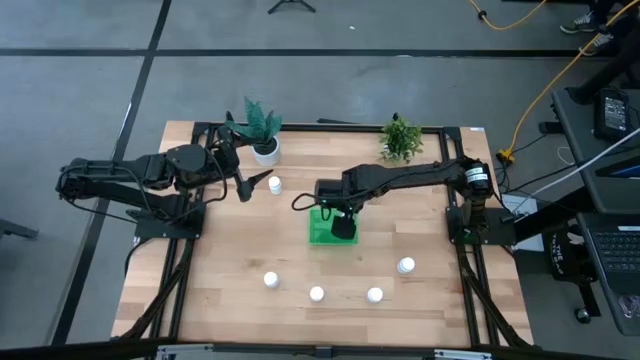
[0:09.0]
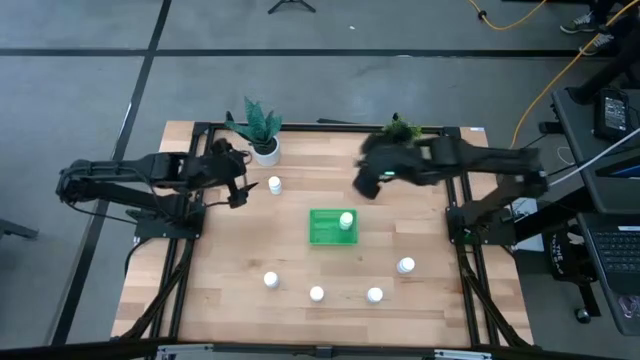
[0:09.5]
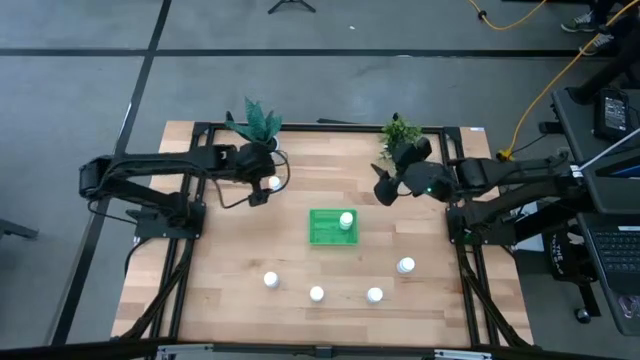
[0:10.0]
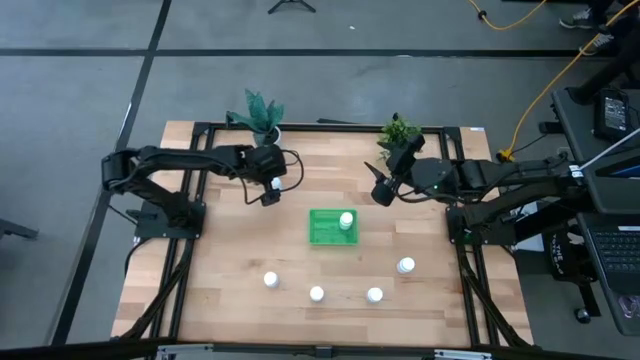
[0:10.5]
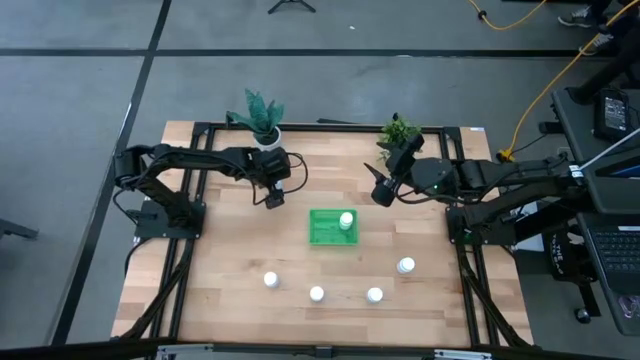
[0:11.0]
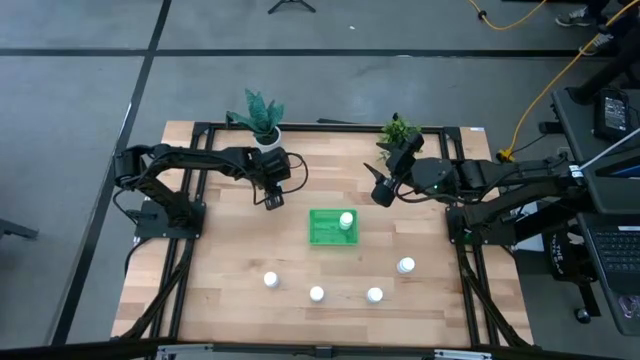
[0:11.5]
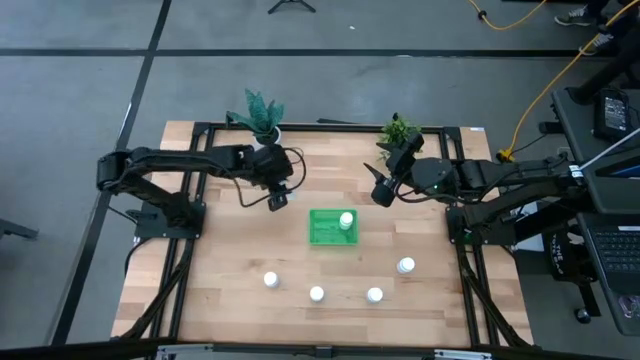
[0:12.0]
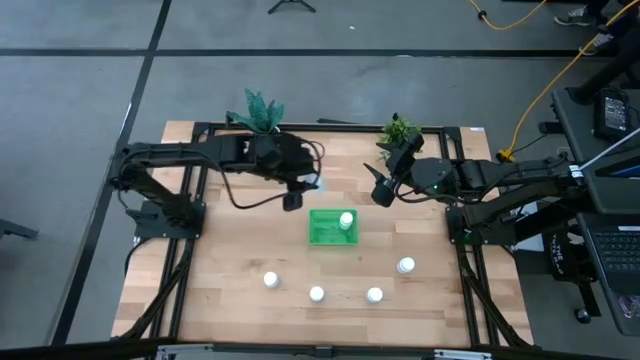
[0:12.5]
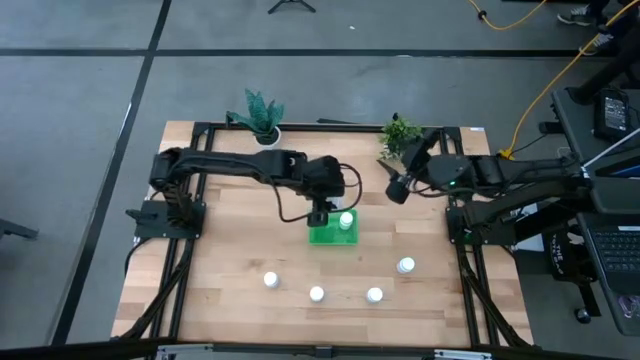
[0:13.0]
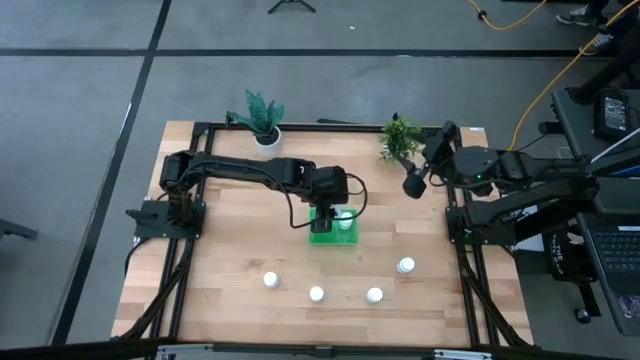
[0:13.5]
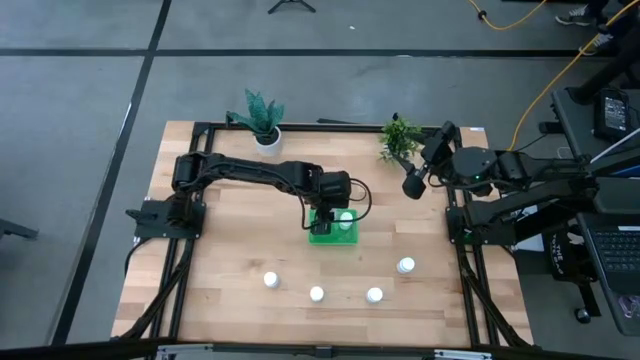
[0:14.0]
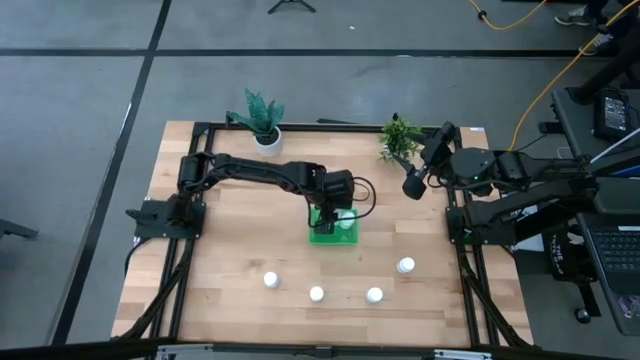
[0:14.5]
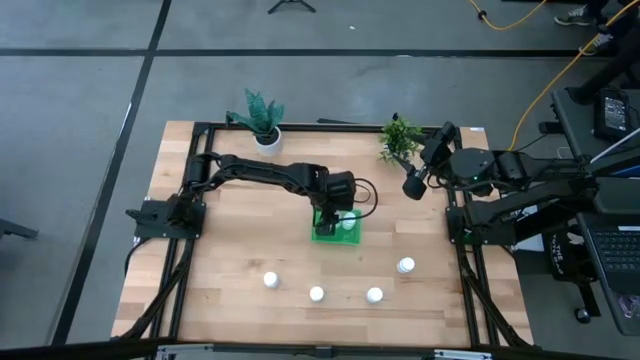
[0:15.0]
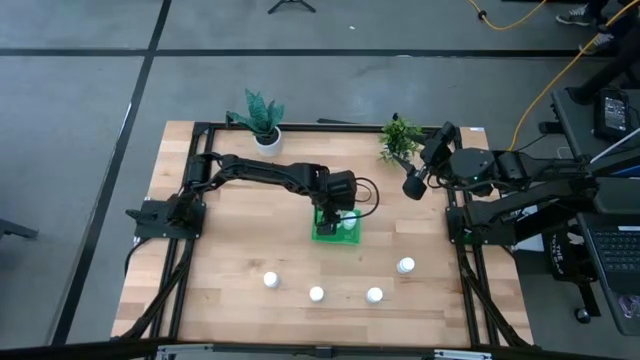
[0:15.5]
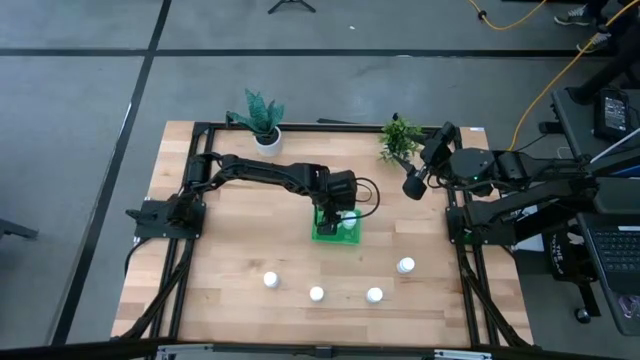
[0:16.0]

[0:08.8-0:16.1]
Task: Pick and place pill bottles into a basket
Put the white pill bottle into the green bin

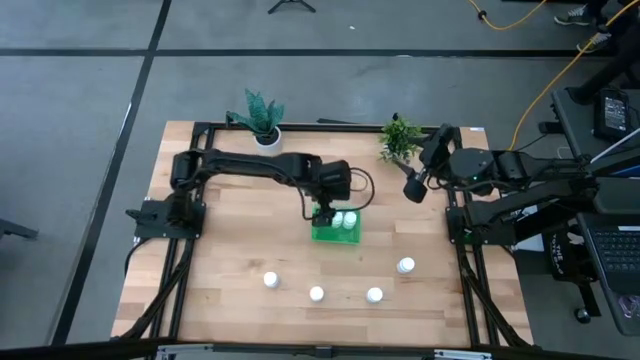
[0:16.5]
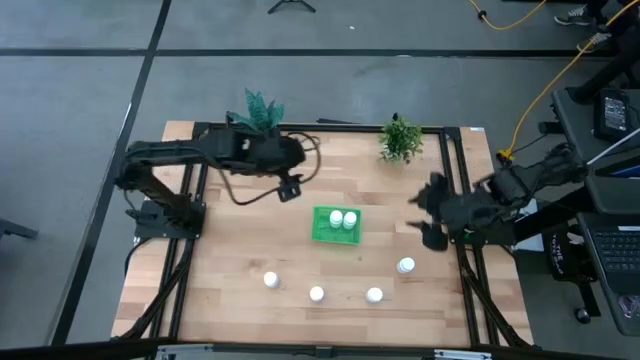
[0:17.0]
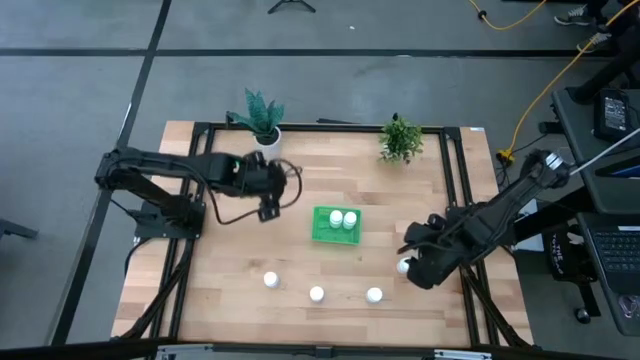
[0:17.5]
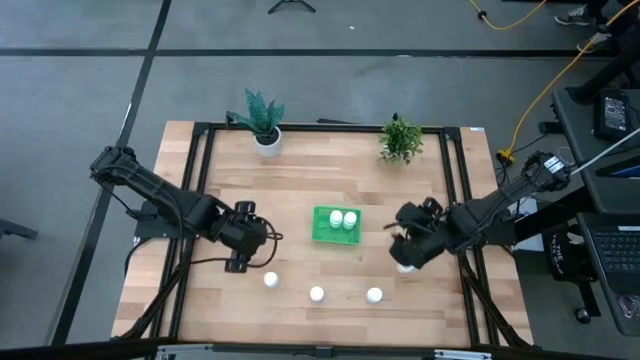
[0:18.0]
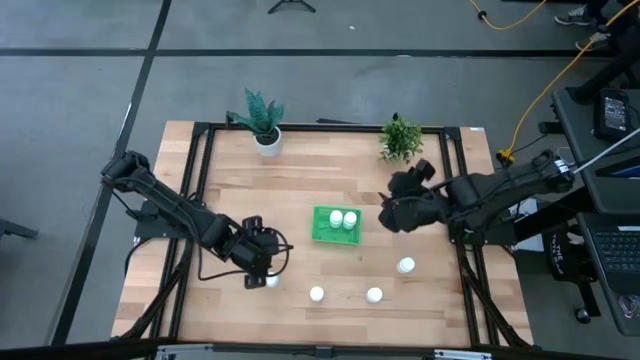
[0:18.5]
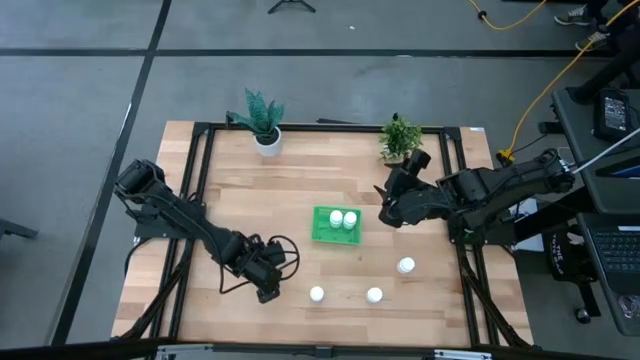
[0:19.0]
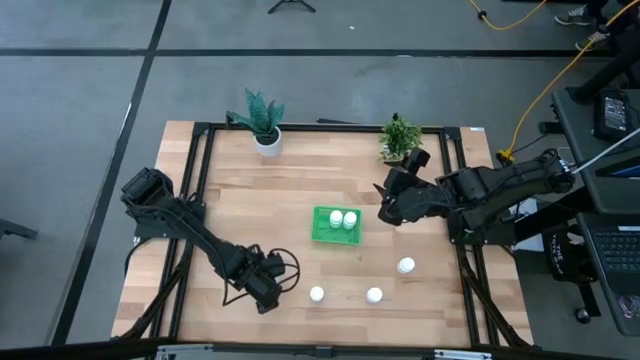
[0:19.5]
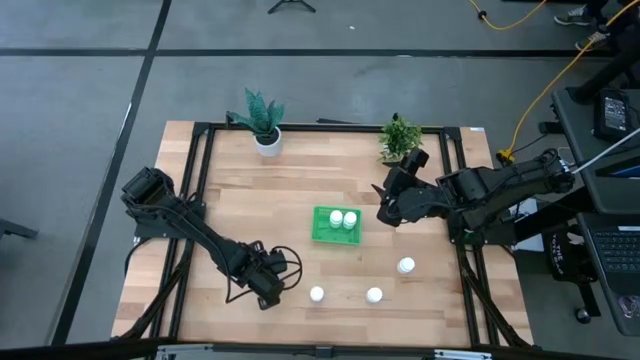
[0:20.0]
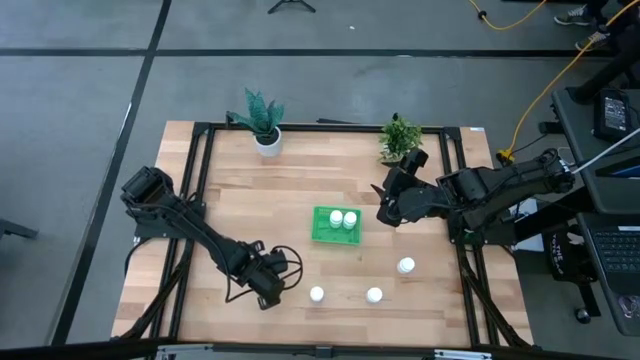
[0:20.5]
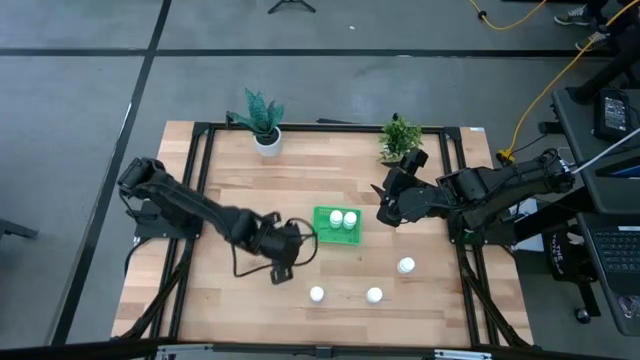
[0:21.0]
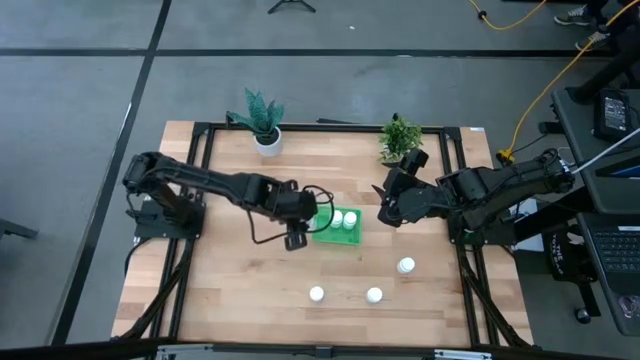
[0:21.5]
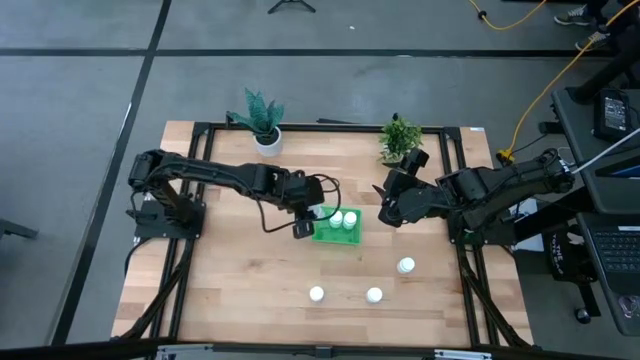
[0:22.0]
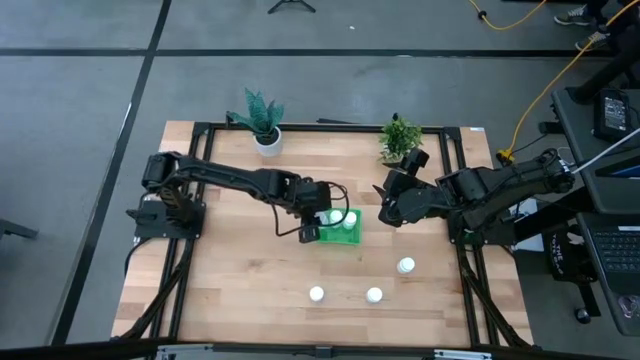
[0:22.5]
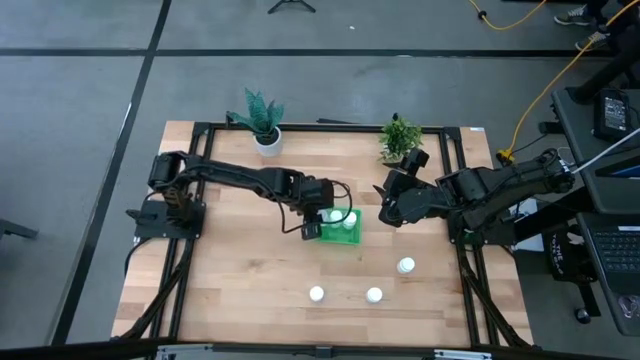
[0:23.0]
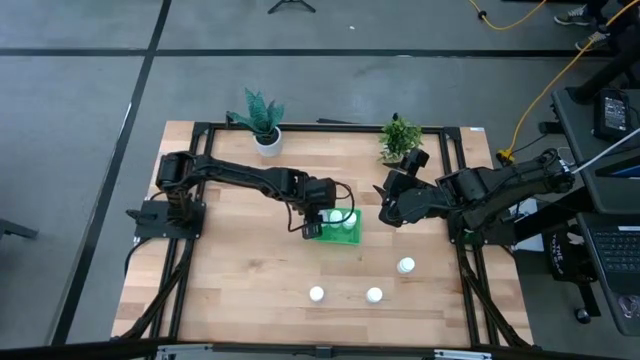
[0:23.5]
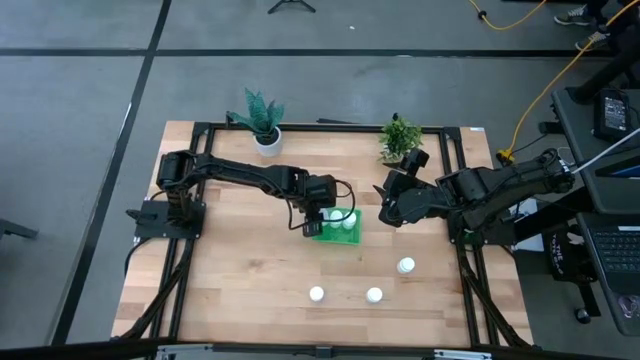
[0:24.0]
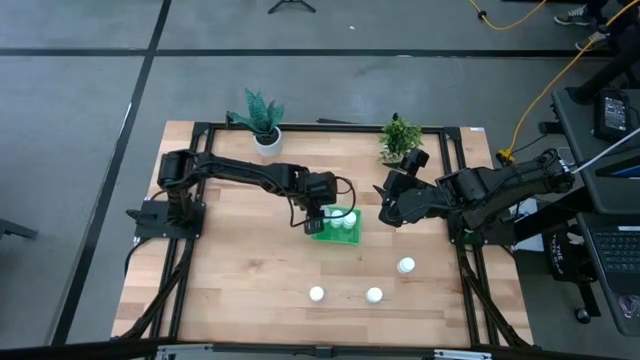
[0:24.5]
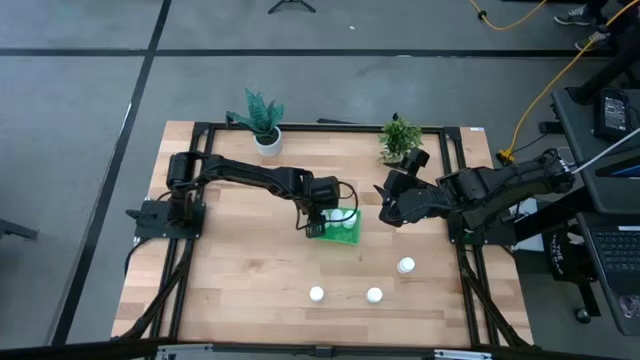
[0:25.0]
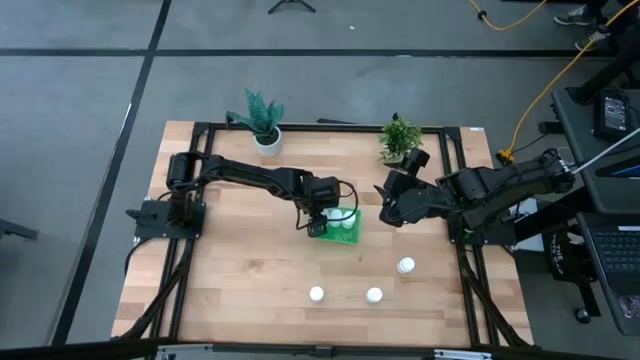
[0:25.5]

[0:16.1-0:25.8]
Put the white pill bottle into the green bin

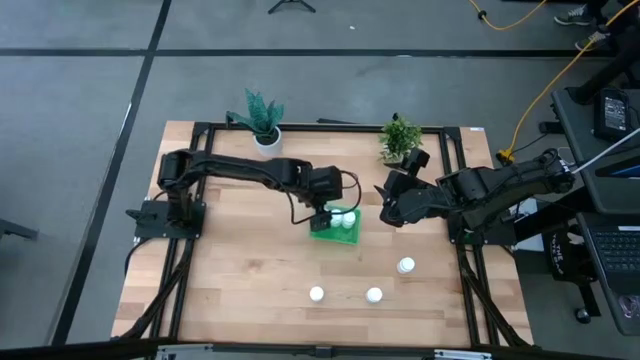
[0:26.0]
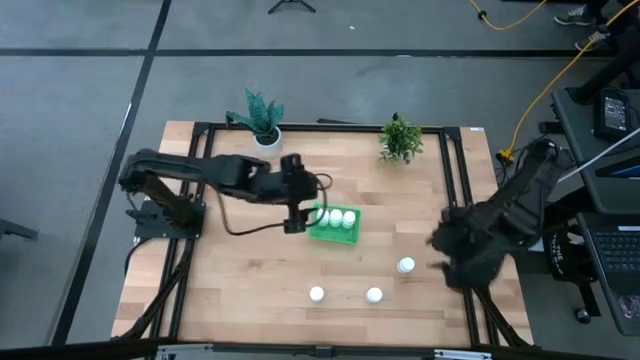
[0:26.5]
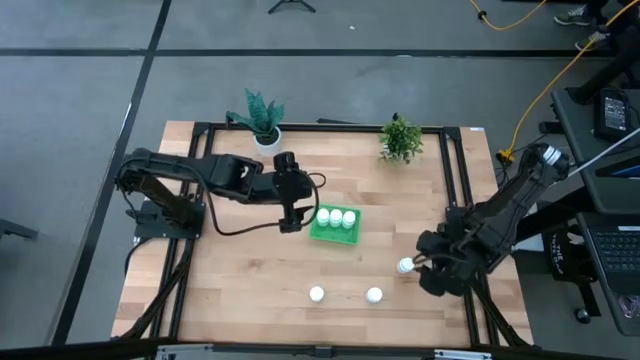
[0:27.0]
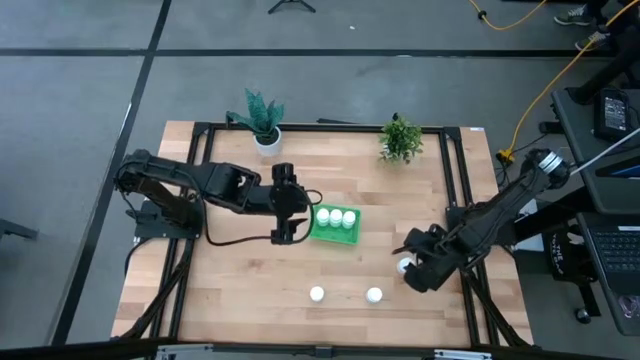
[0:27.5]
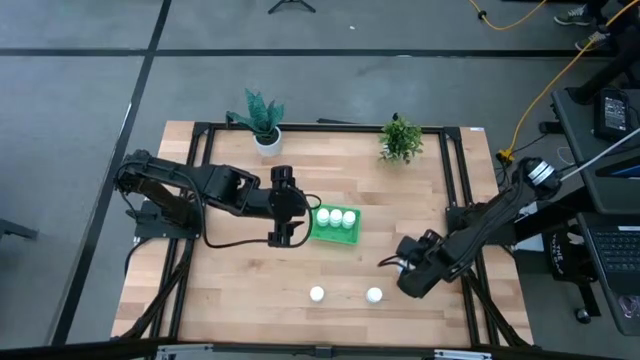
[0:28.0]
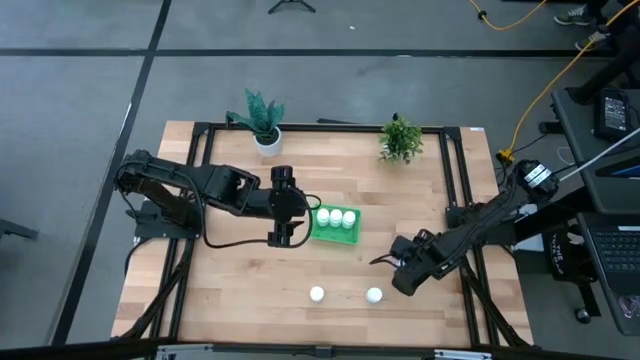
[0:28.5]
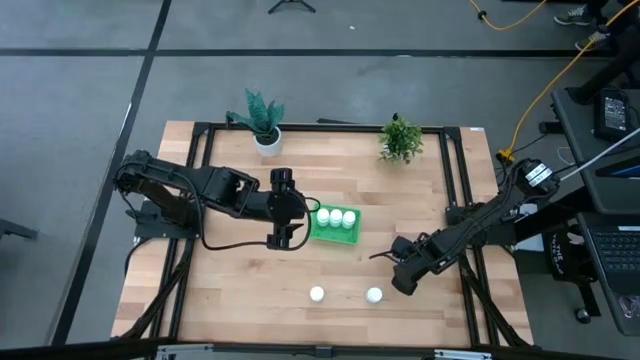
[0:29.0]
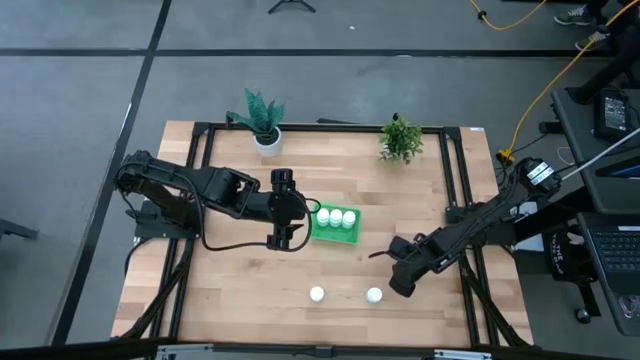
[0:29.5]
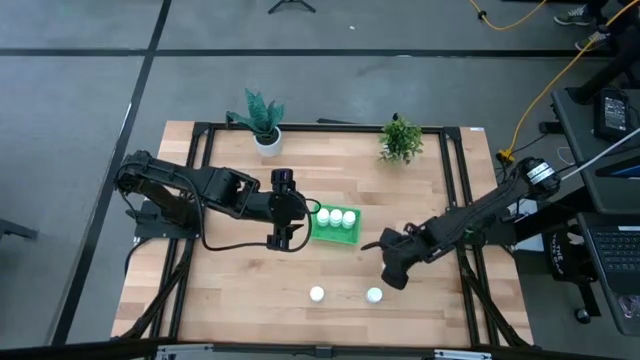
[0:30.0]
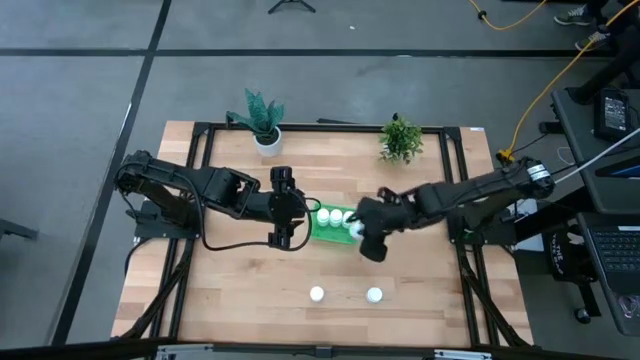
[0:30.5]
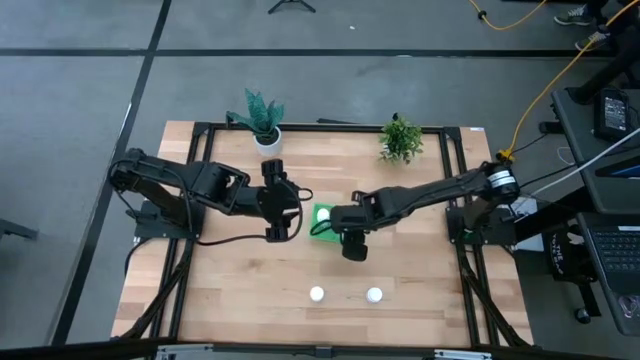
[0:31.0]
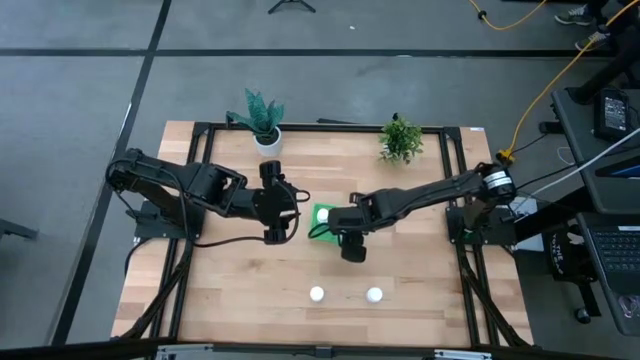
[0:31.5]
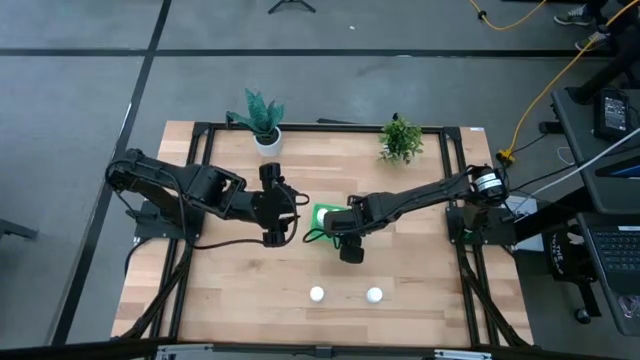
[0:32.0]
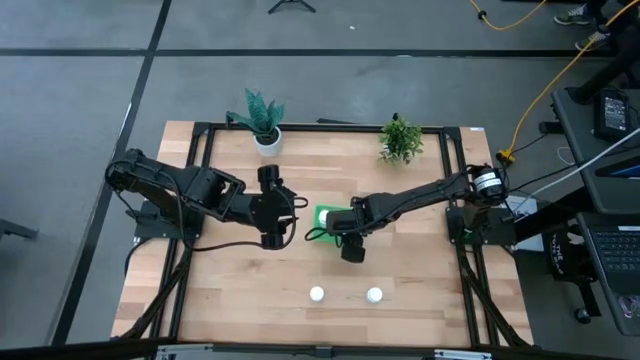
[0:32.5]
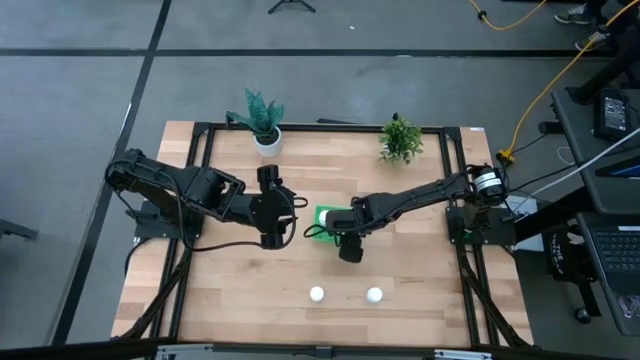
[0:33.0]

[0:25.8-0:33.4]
Put the white pill bottle into the green bin
